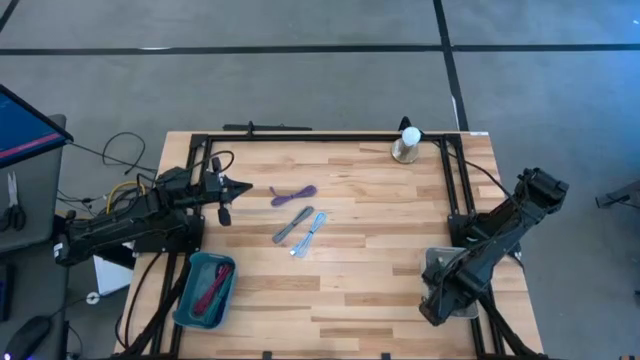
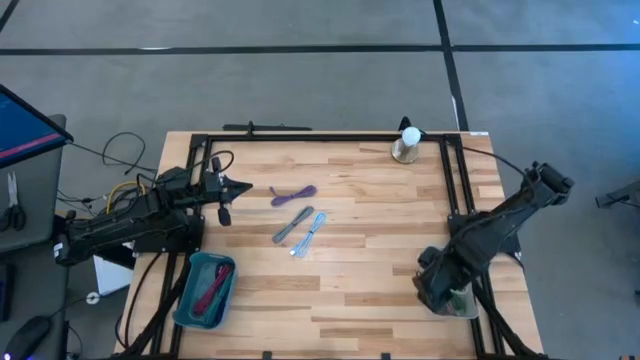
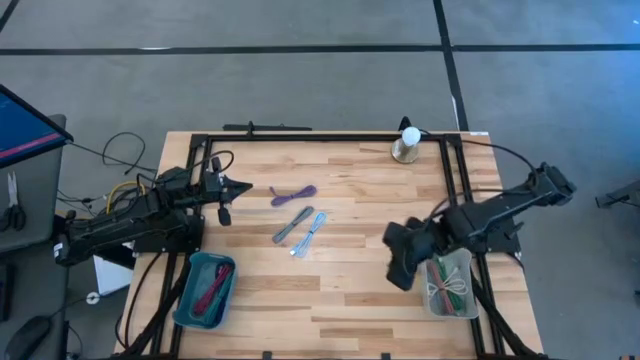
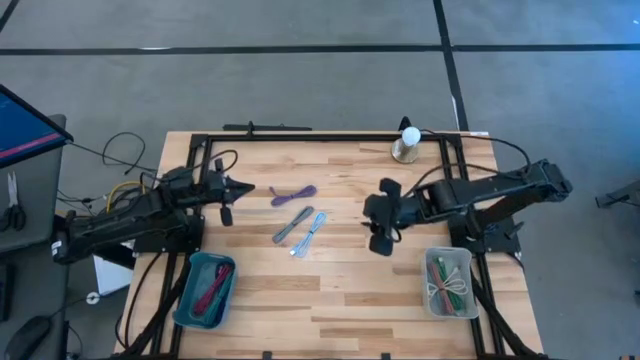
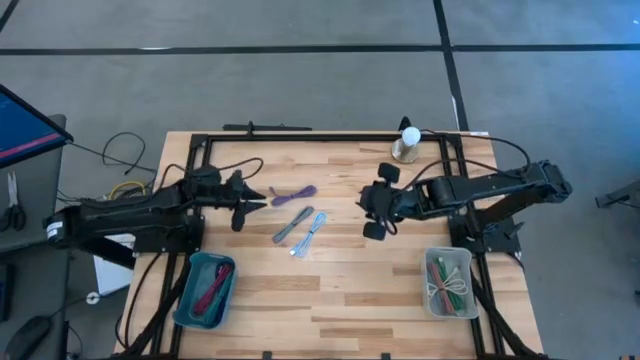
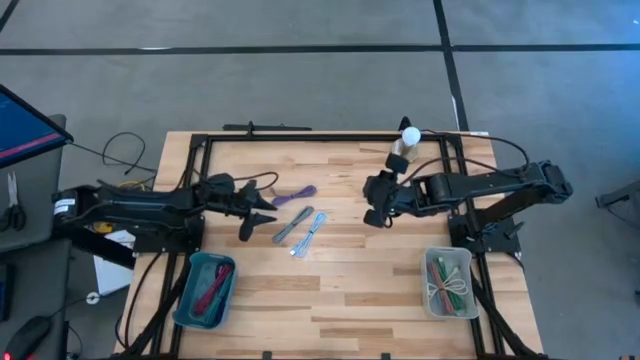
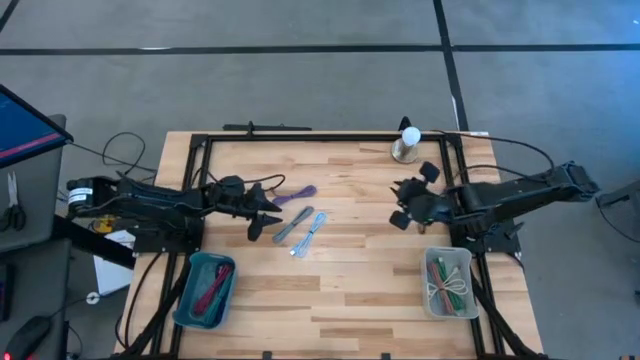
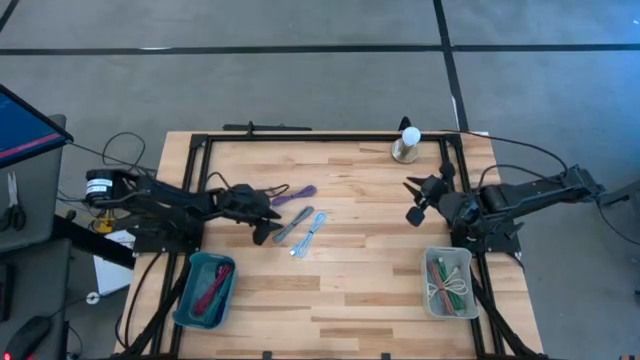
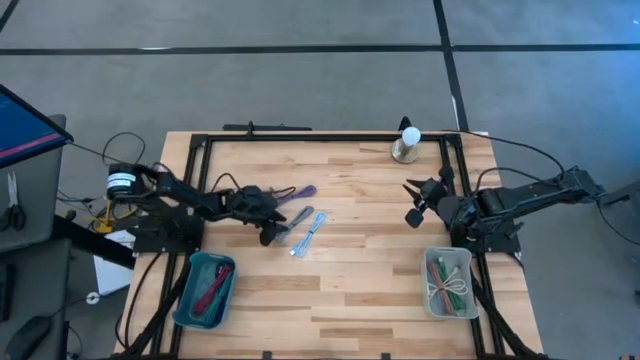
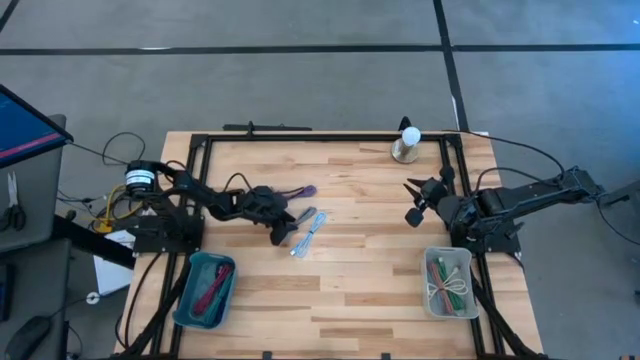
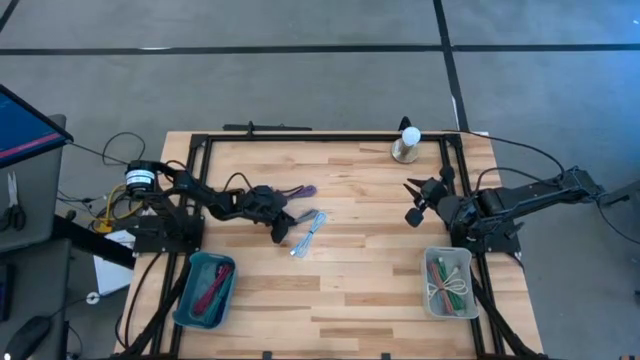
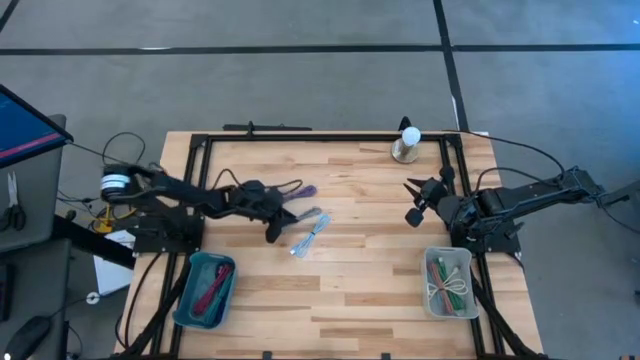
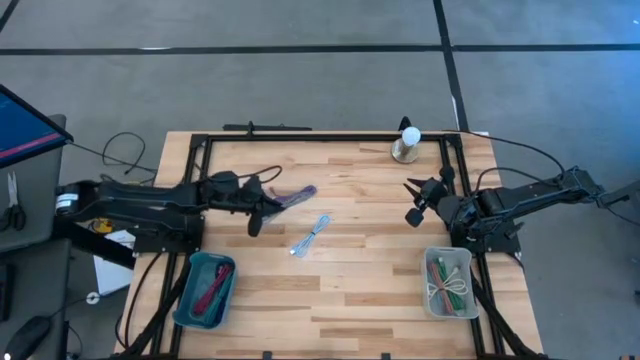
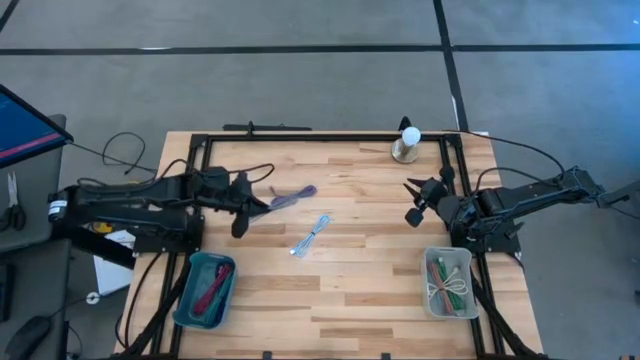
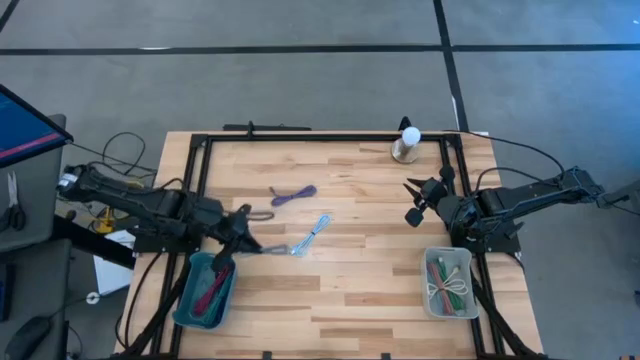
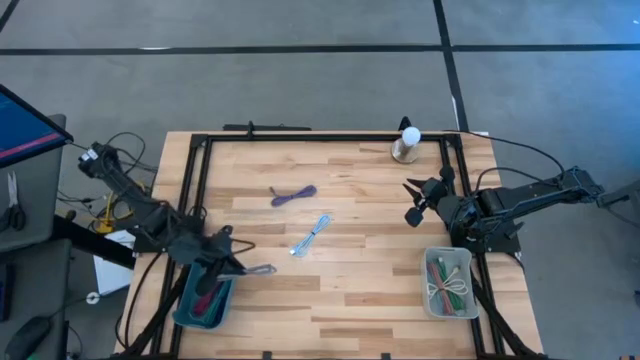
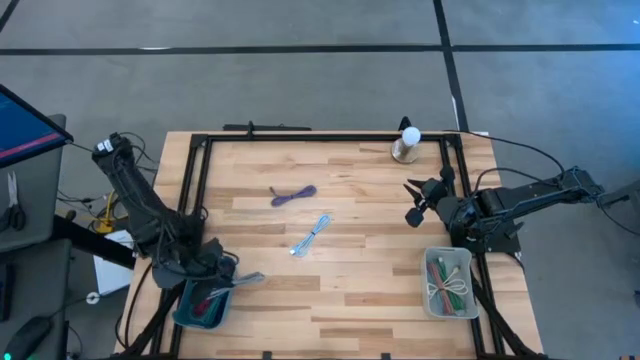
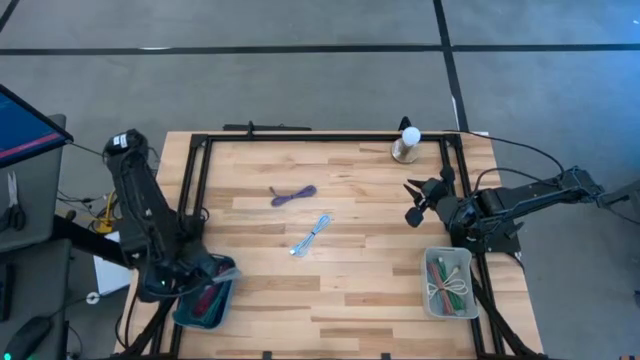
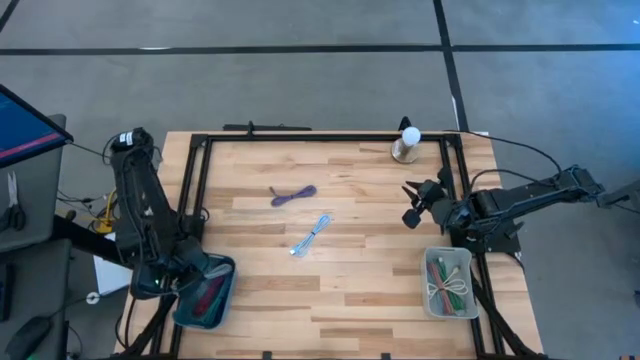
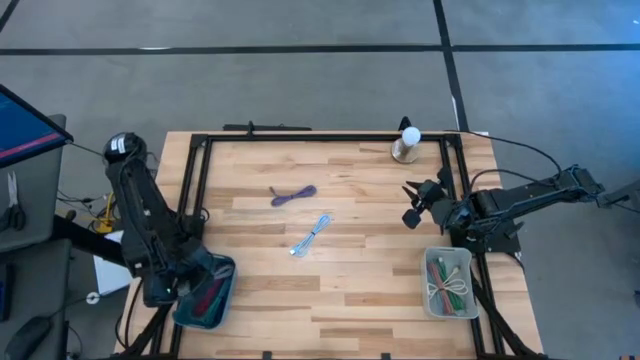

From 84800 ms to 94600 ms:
Task: Pick & Place USB Port
Put the white patterned USB cable into the blue bin

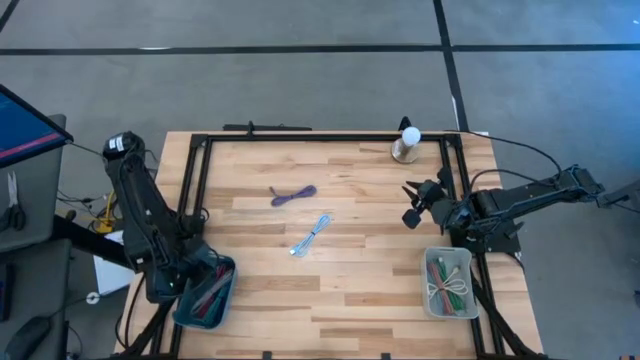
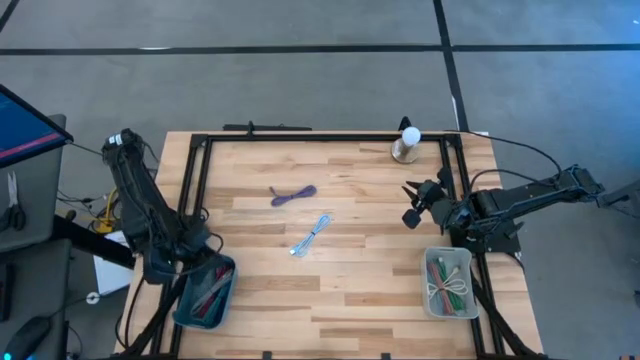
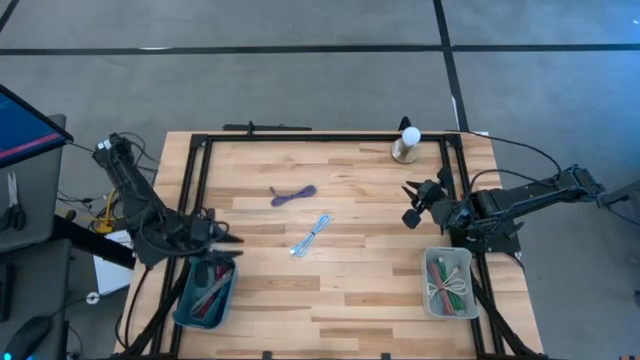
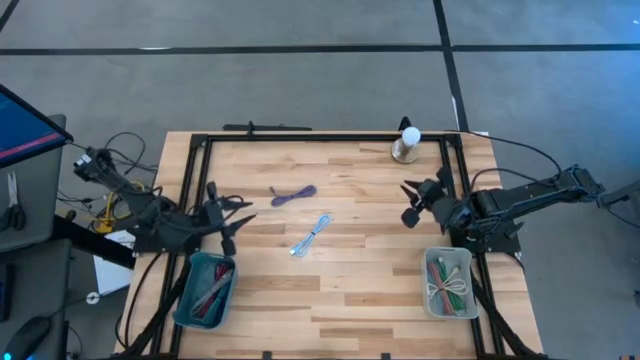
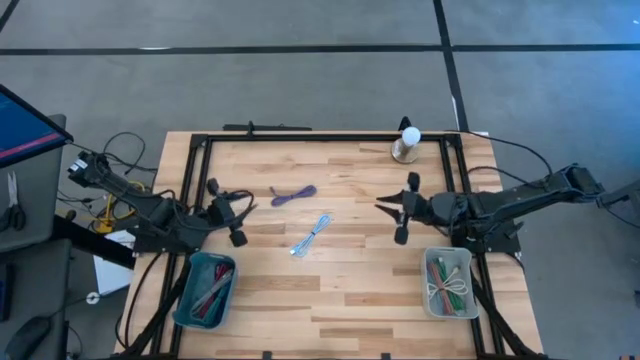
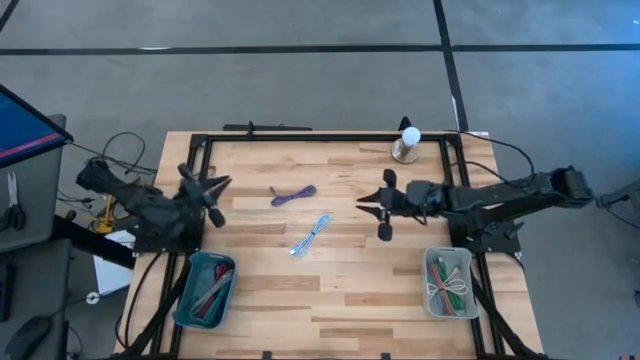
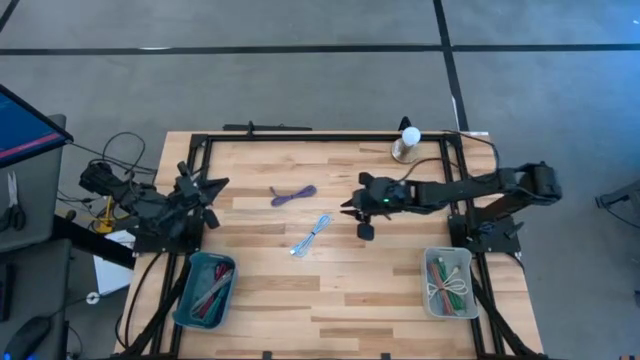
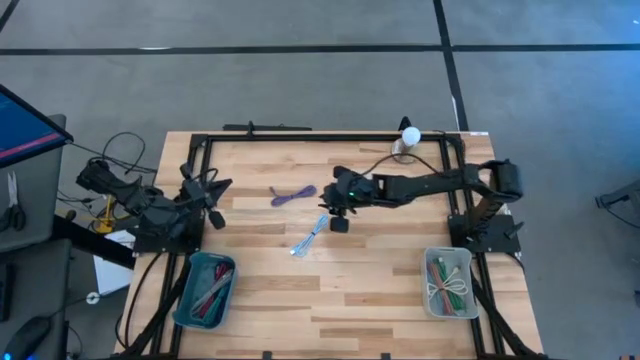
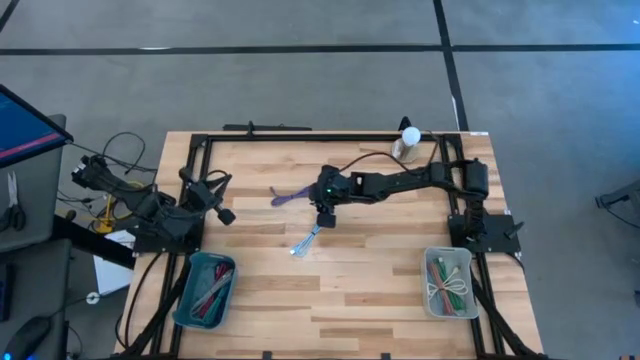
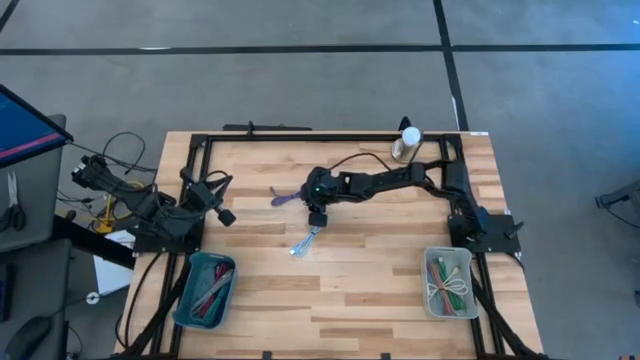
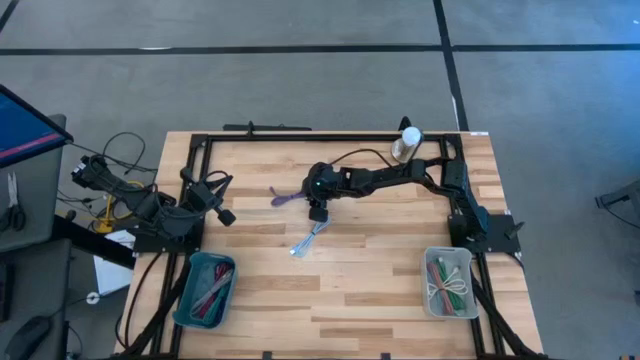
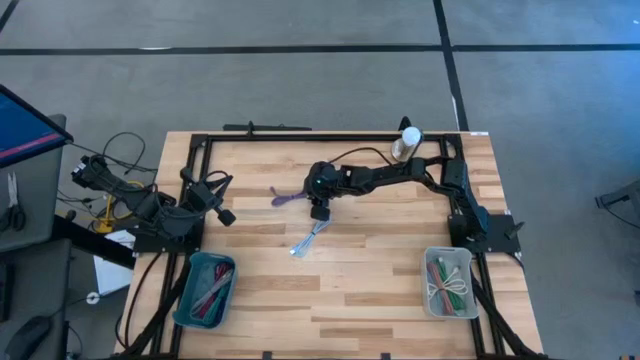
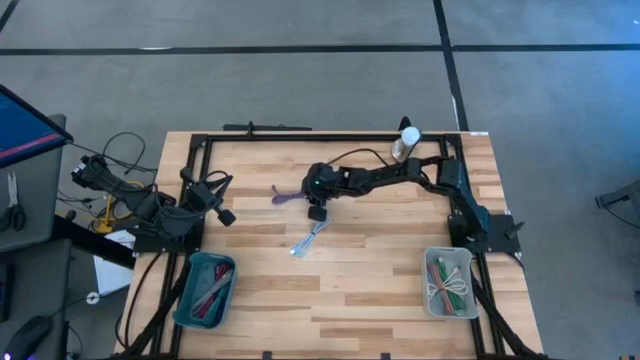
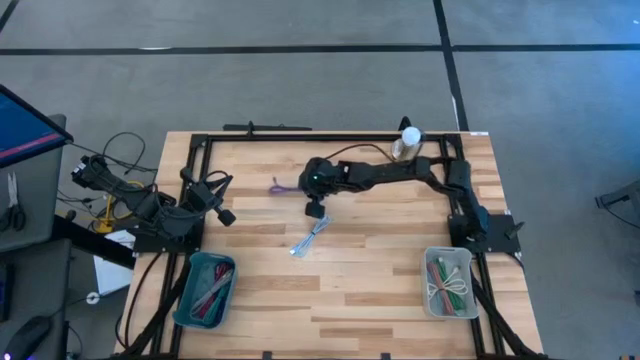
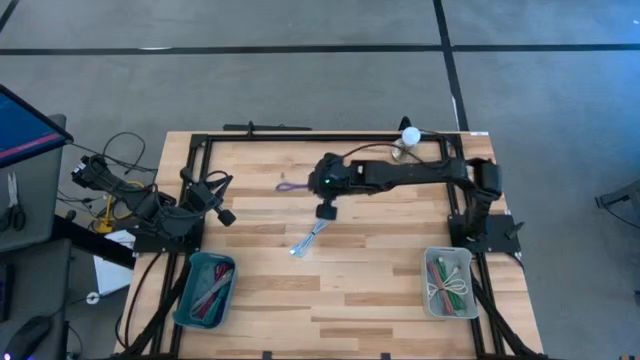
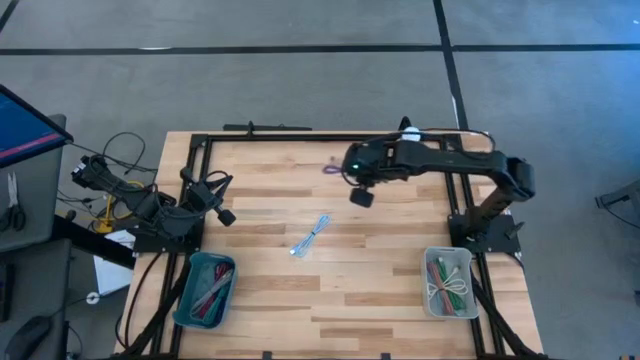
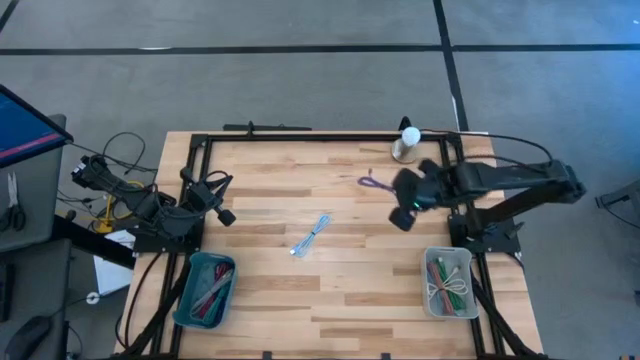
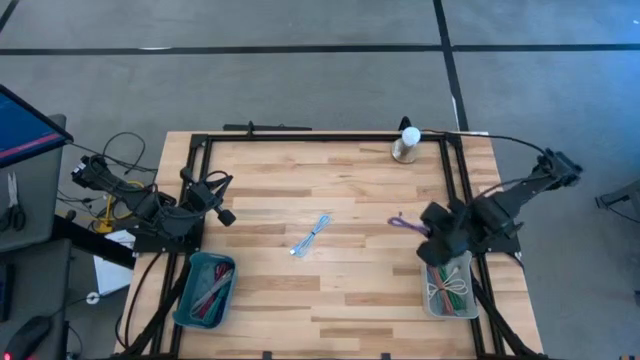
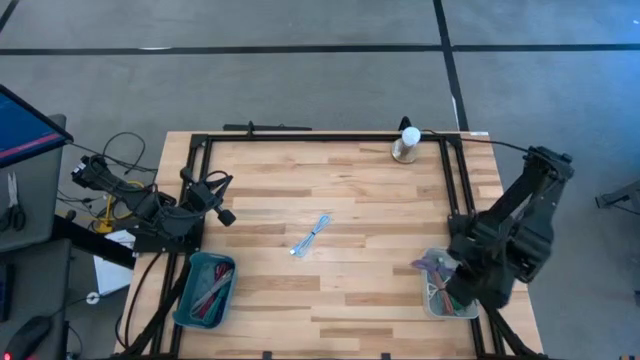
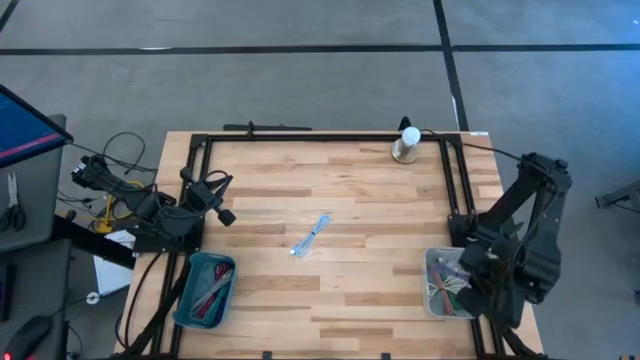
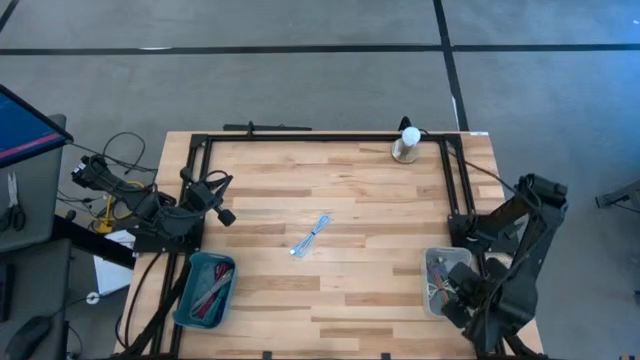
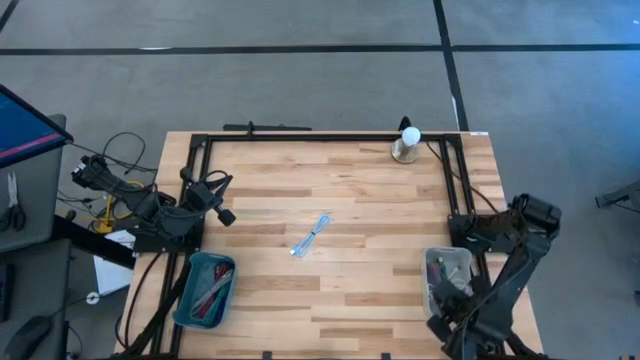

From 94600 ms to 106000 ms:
Put the purple USB cable into the gray bin

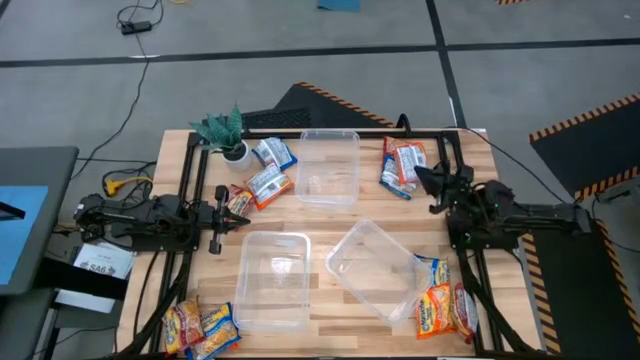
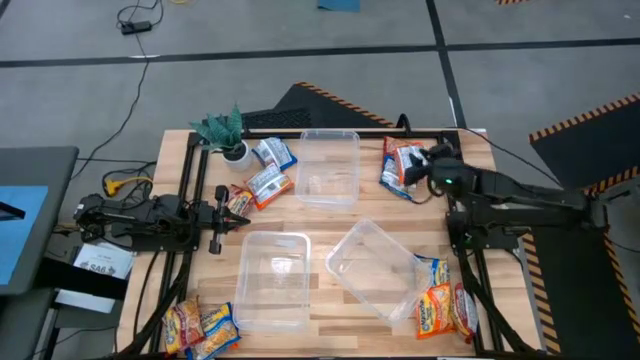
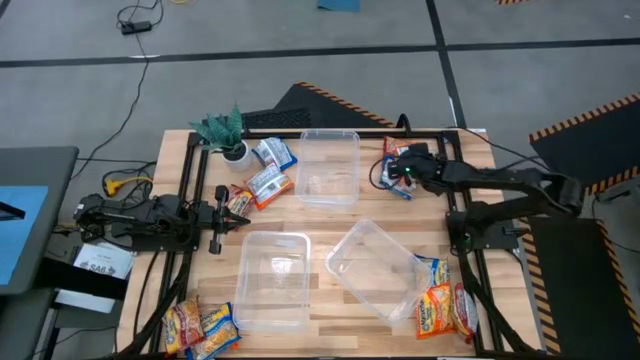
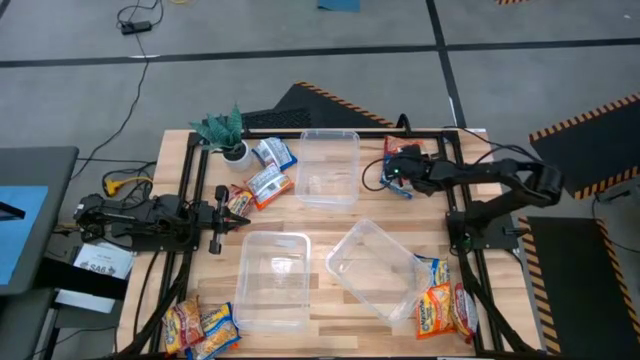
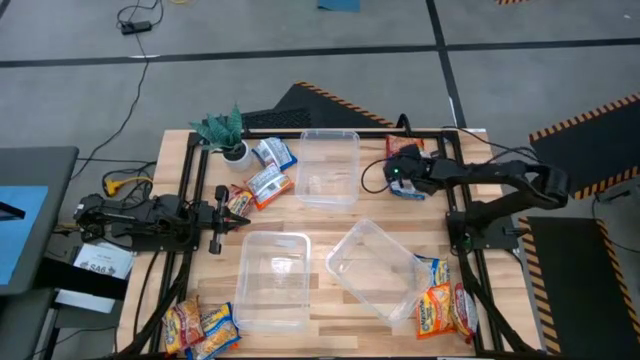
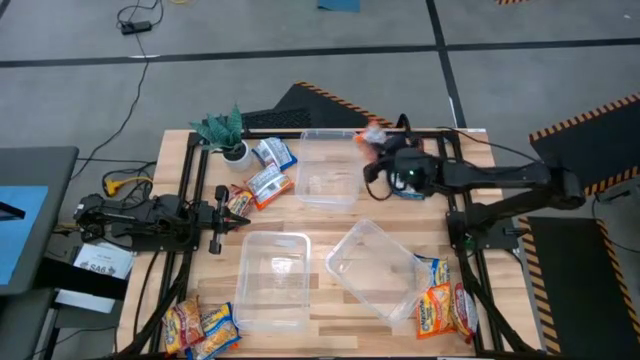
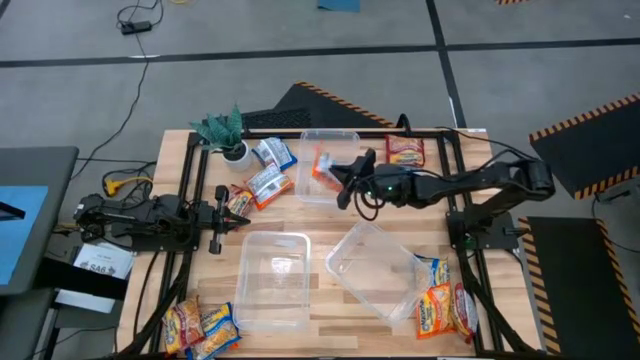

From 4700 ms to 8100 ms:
Task: Sort Maruchan noodles
Put the orange noodle pack into the top transparent bin
